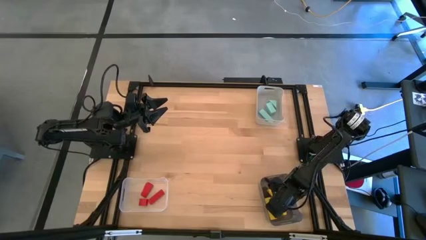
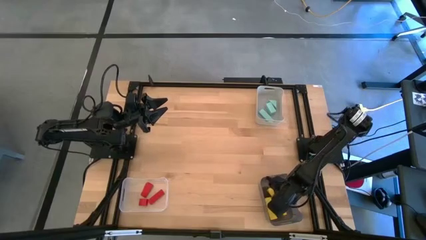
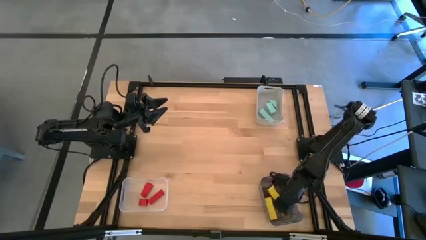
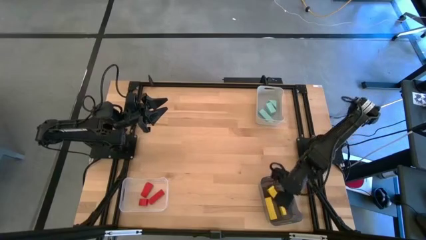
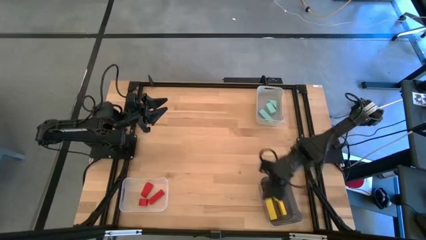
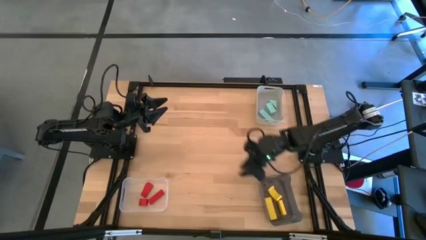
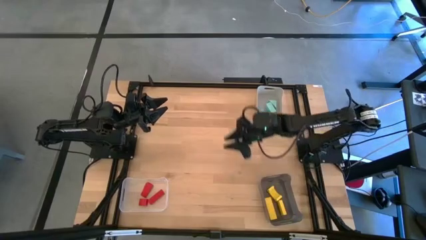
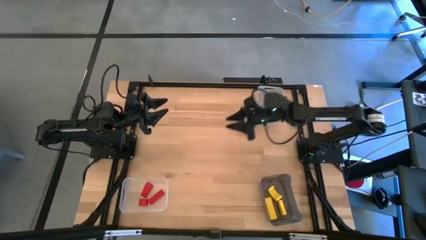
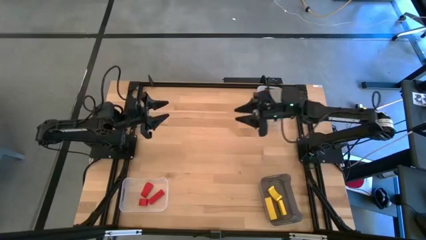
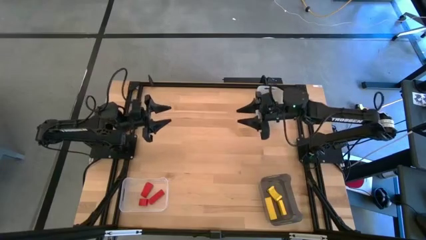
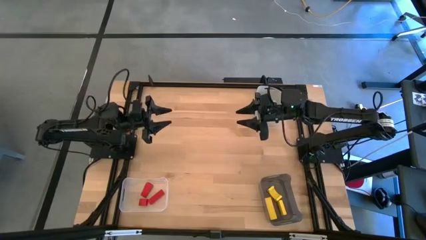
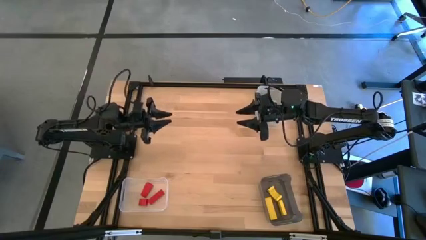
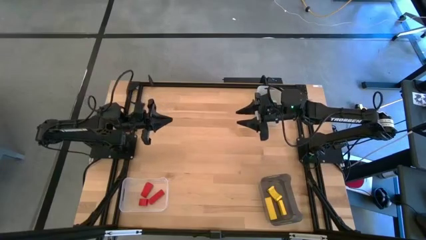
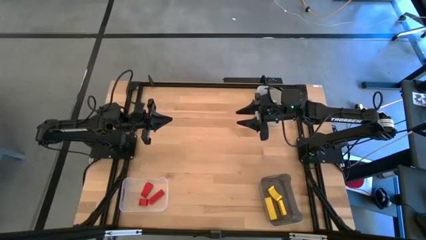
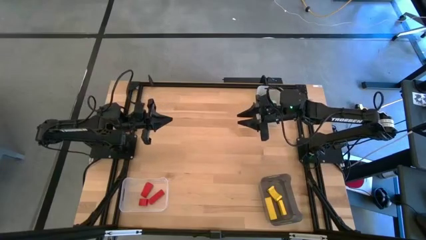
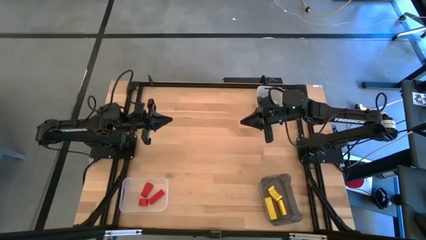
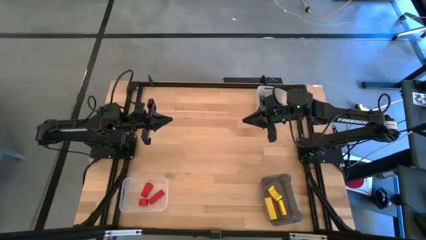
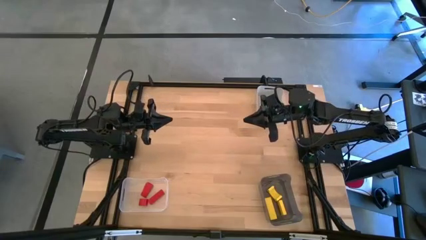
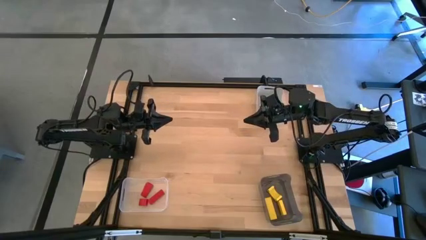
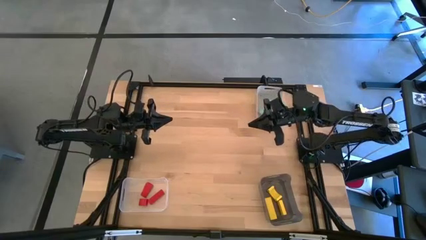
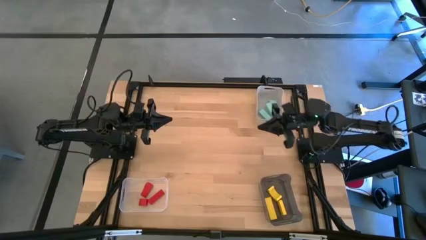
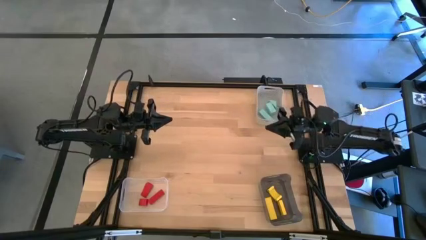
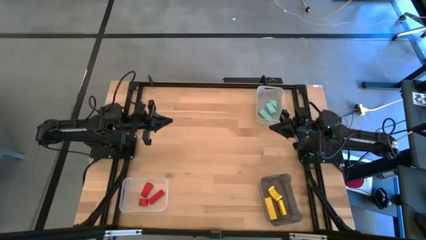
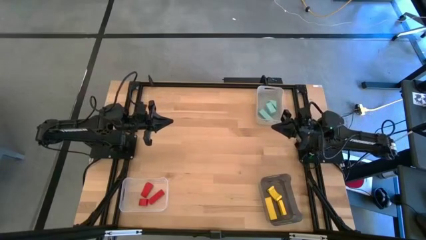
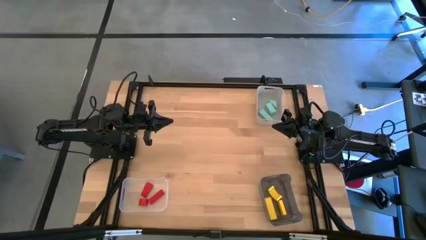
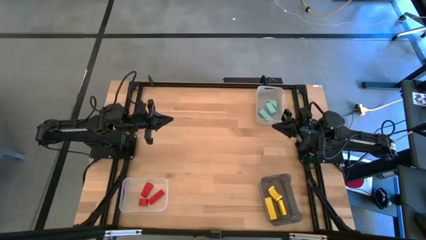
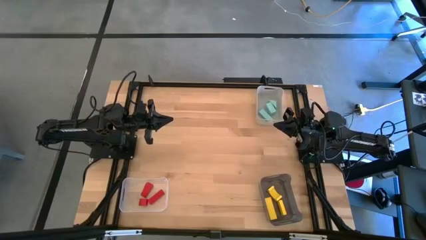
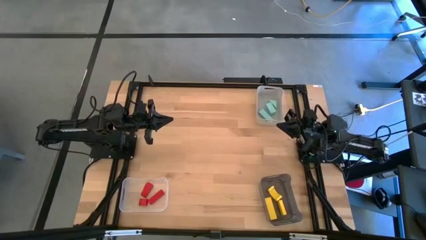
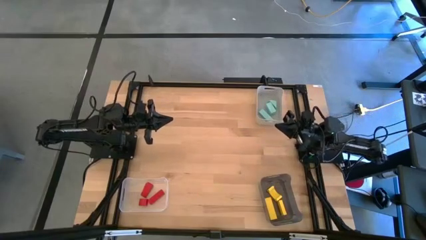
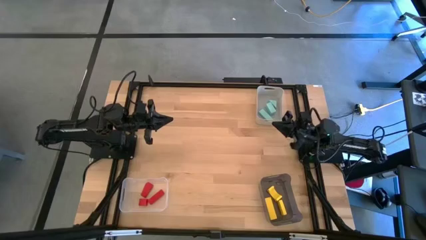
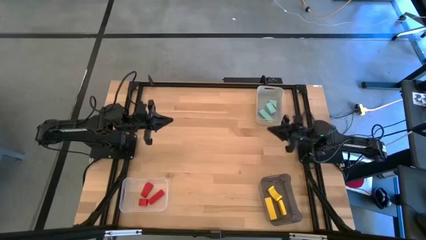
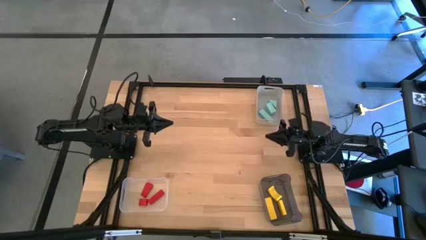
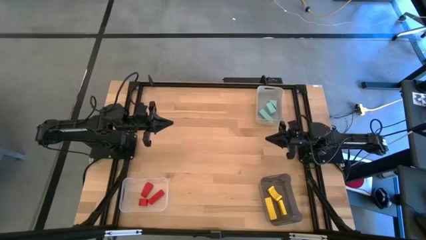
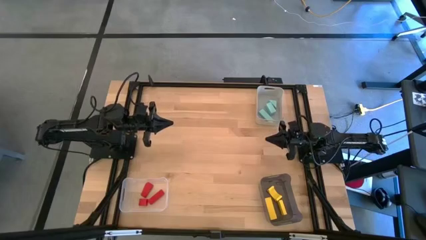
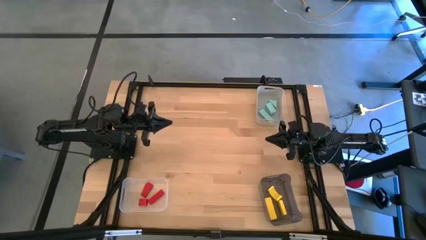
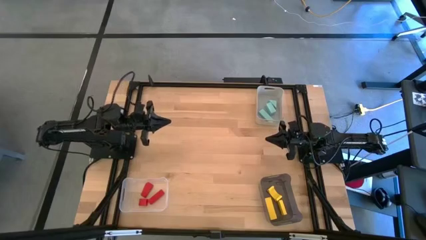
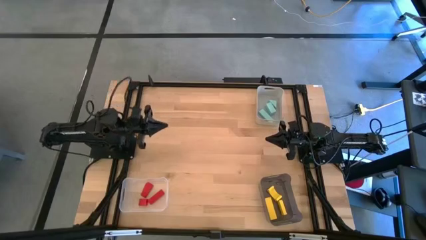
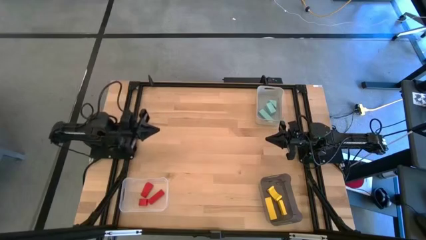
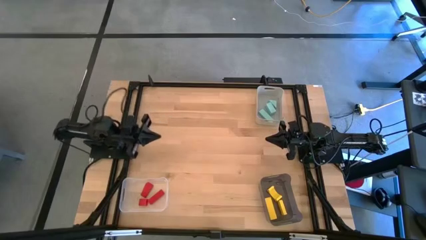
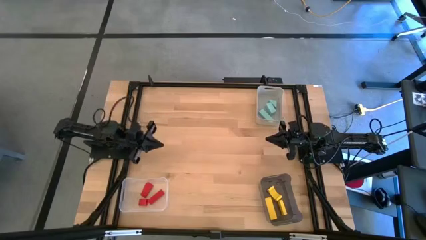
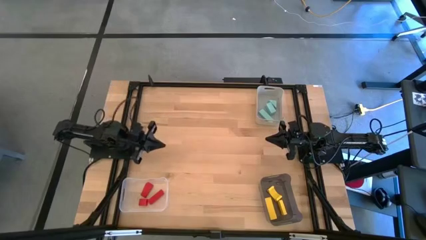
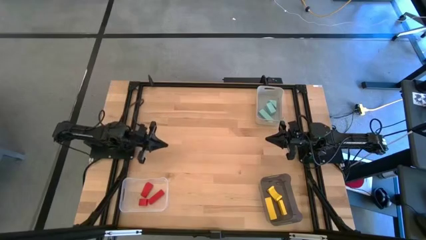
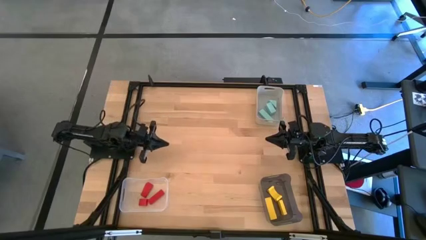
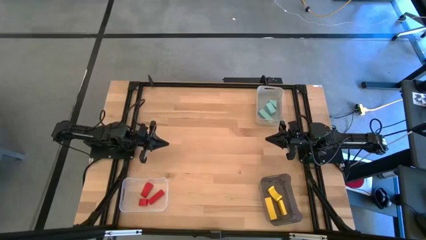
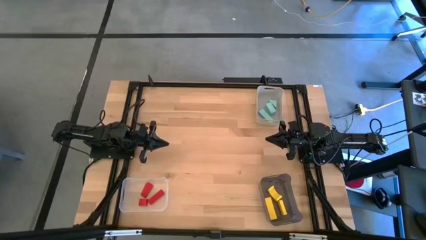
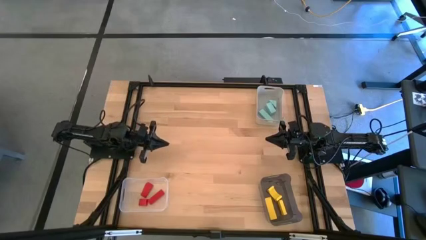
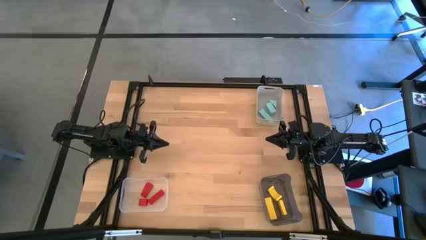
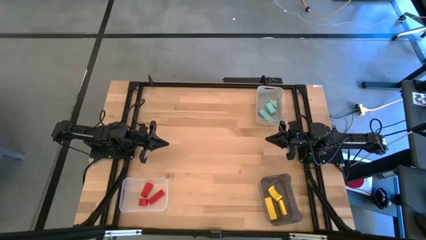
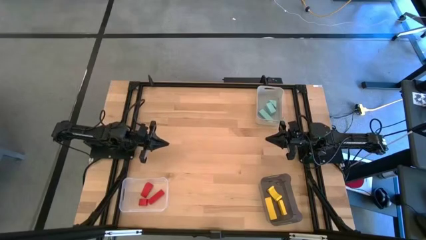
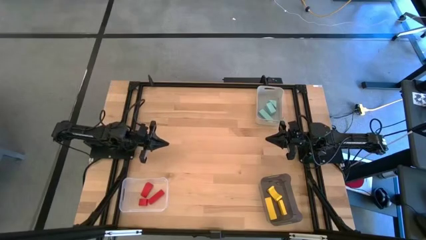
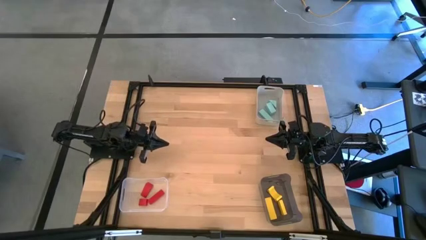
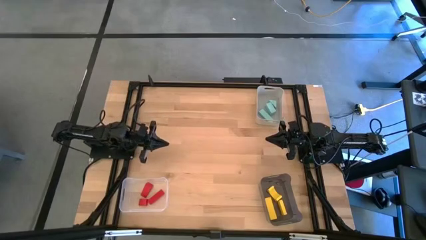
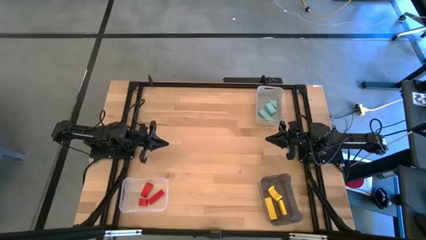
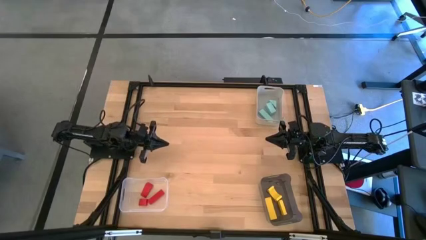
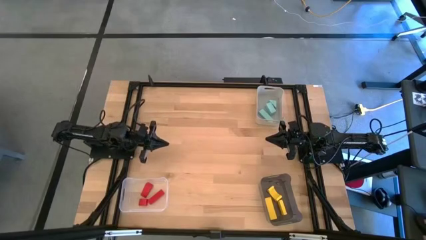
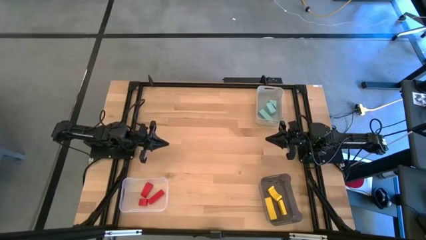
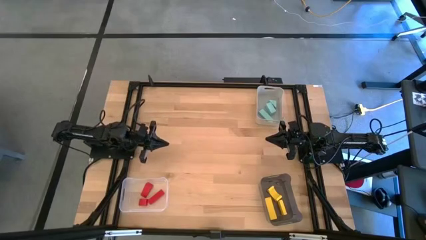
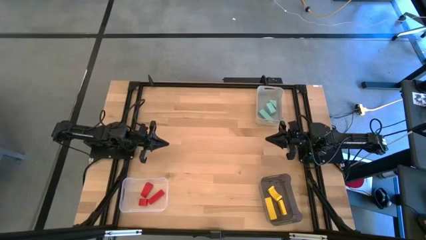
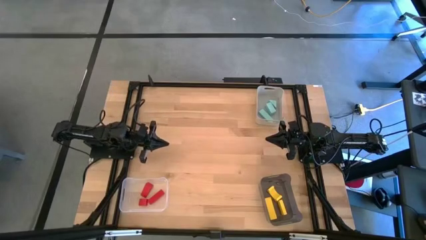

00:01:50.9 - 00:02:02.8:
Task: Sort & place blocks by color
Return to Home Position

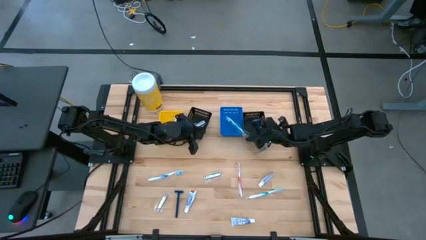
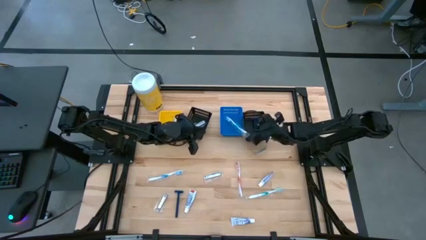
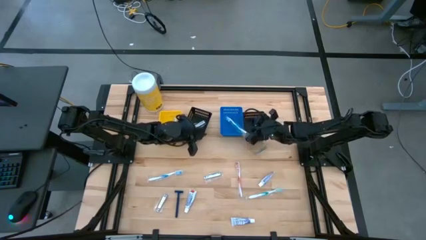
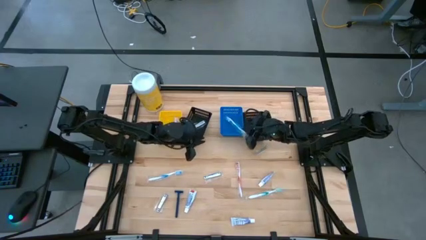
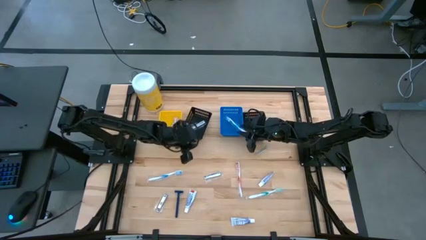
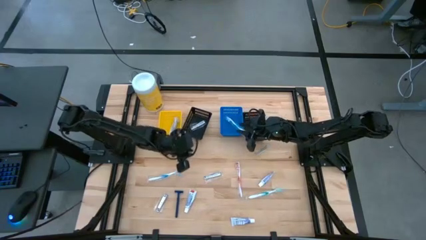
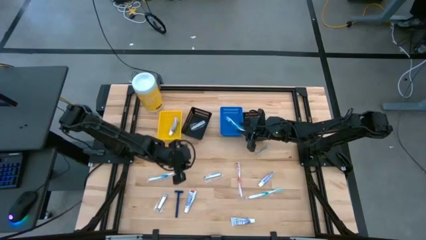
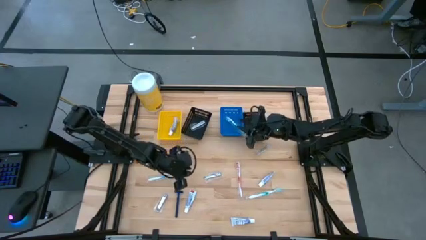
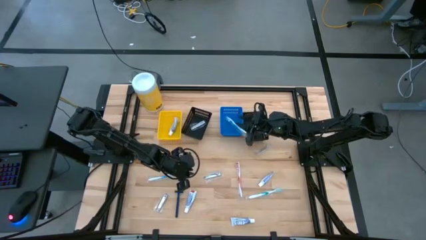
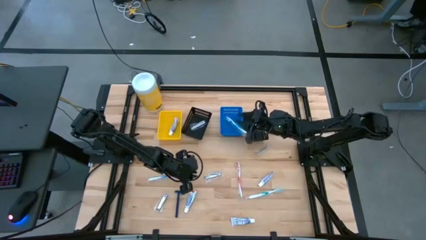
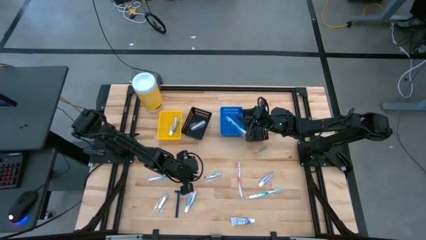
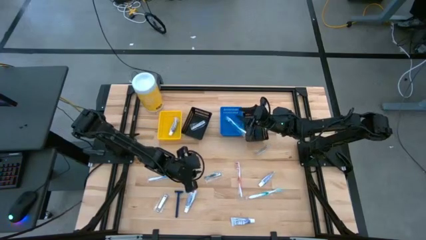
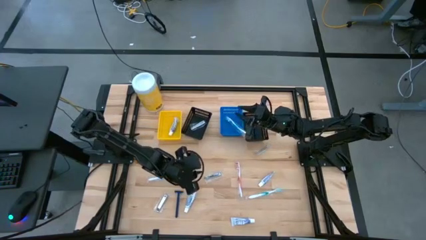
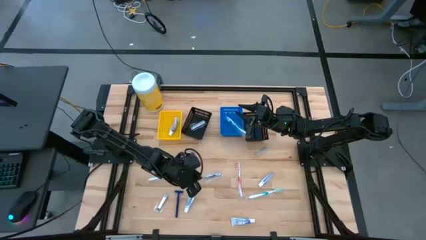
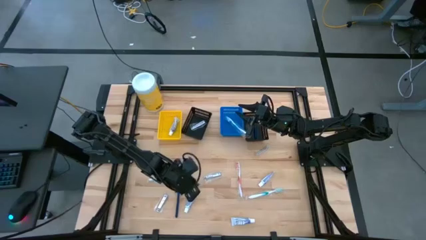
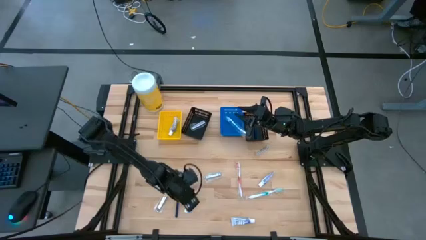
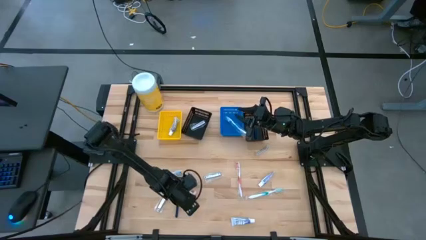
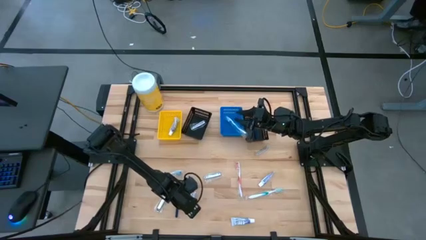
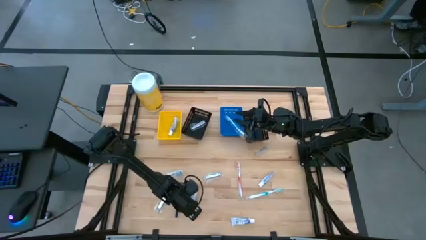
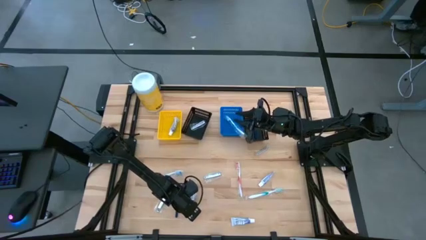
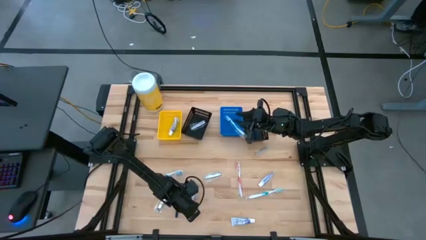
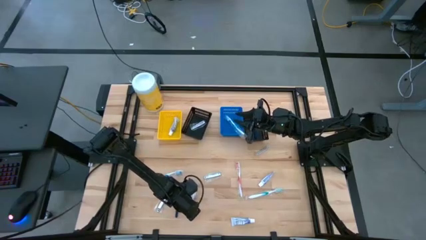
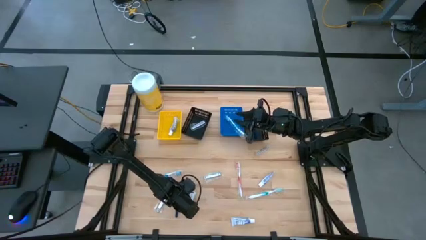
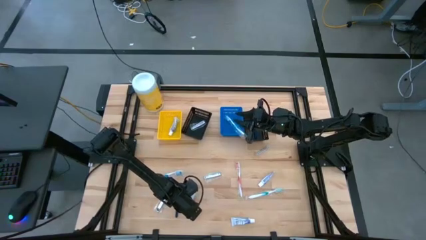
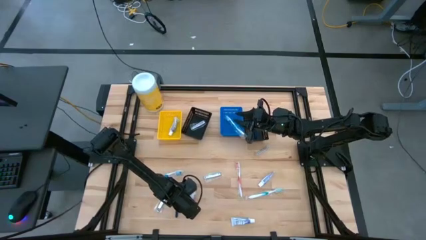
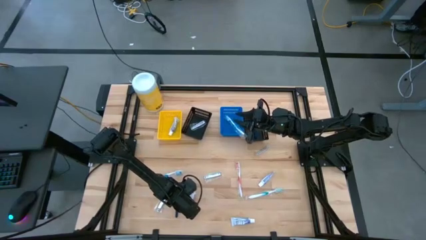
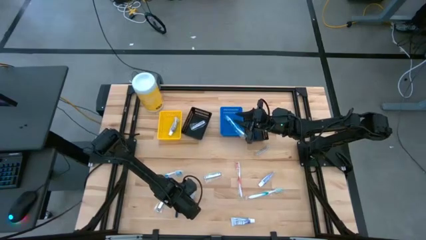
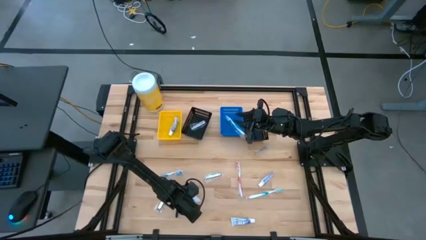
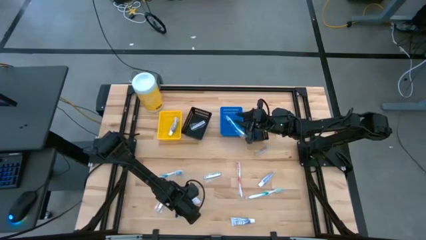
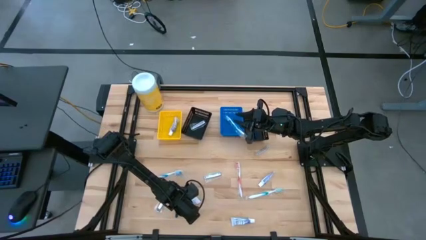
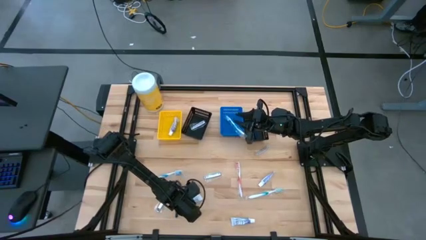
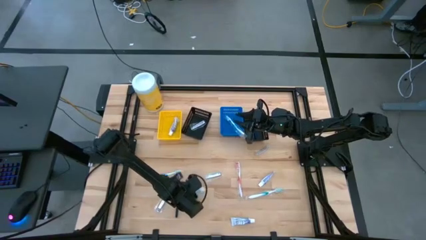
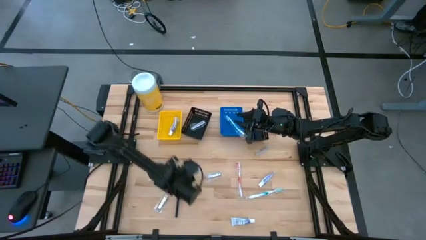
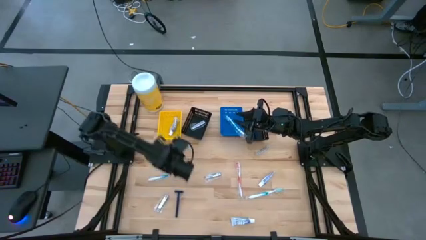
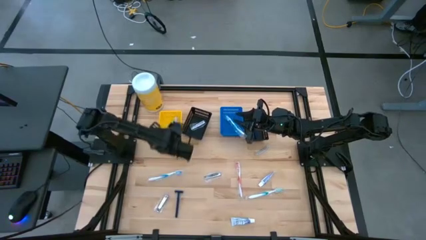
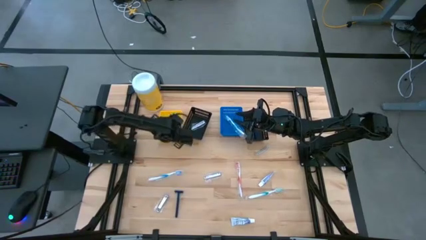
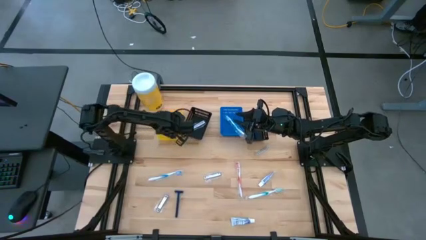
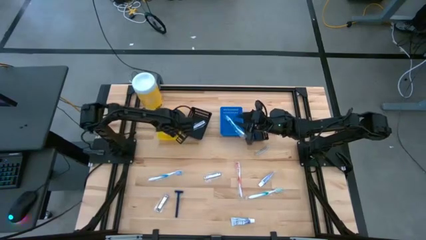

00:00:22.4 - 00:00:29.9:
Task: Pick & Place Travel size toiletries
Put the white toothpaste into the yellow bin
